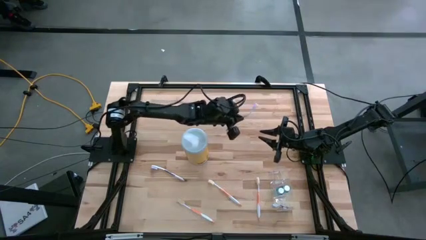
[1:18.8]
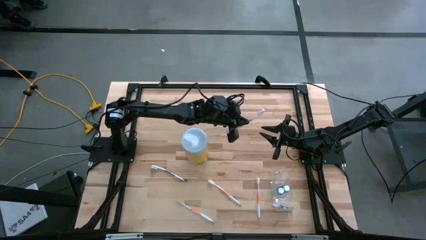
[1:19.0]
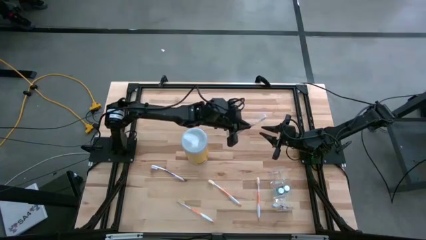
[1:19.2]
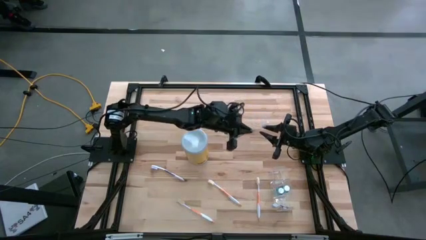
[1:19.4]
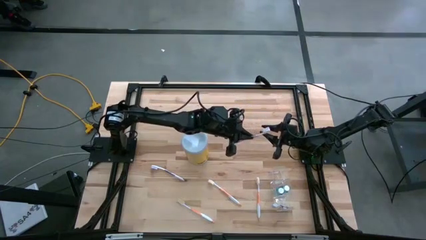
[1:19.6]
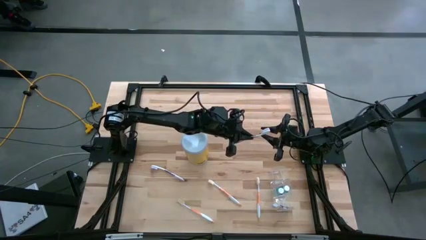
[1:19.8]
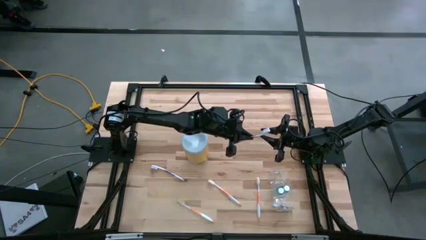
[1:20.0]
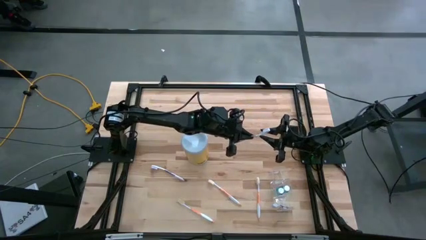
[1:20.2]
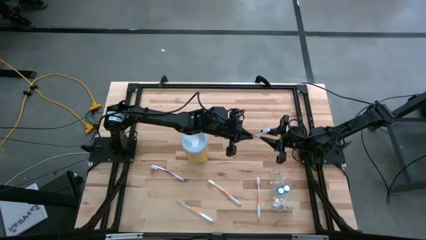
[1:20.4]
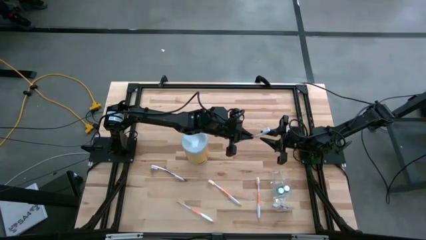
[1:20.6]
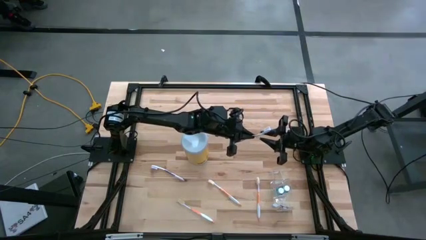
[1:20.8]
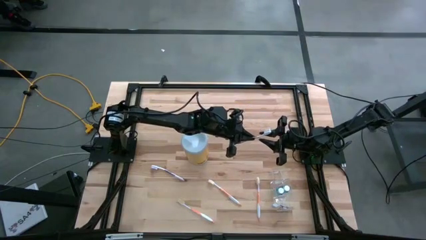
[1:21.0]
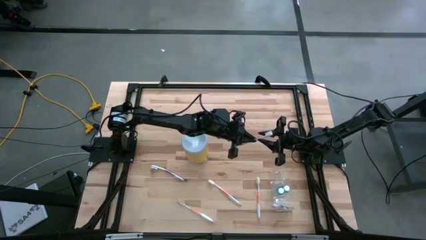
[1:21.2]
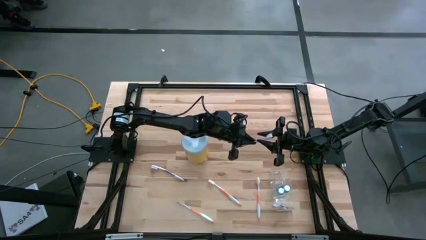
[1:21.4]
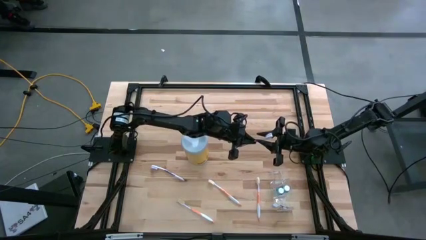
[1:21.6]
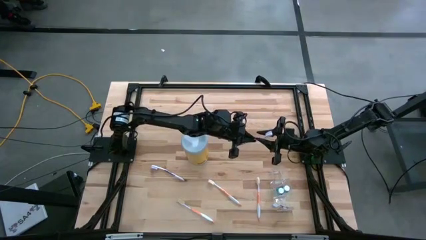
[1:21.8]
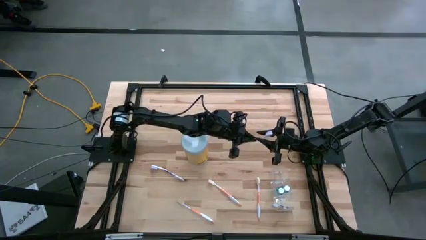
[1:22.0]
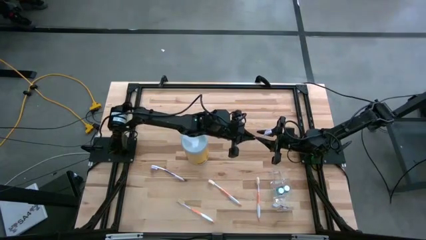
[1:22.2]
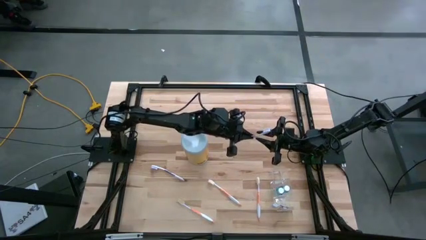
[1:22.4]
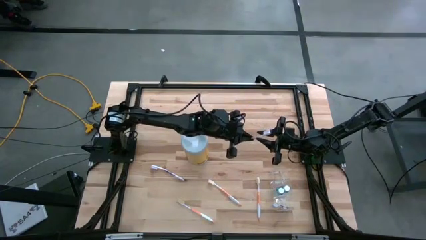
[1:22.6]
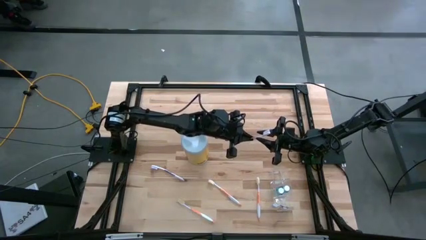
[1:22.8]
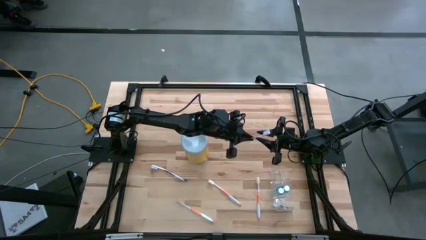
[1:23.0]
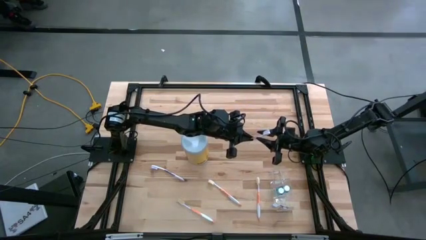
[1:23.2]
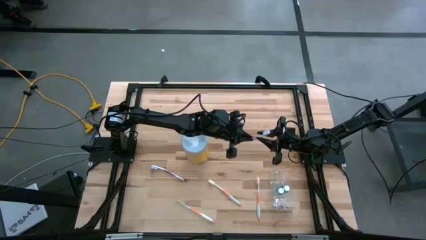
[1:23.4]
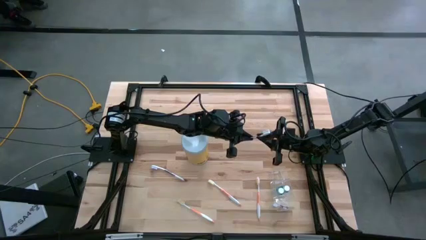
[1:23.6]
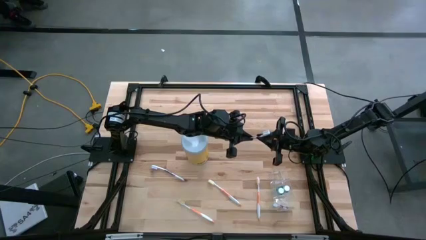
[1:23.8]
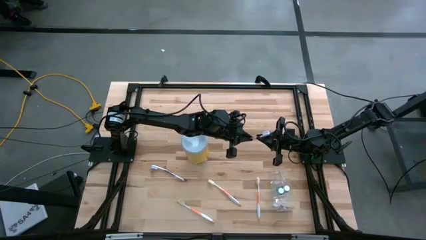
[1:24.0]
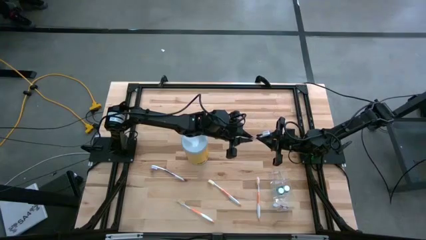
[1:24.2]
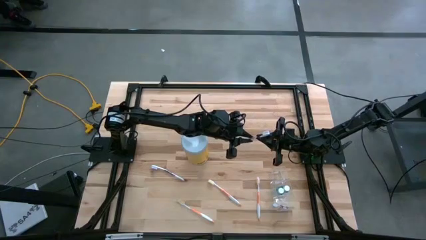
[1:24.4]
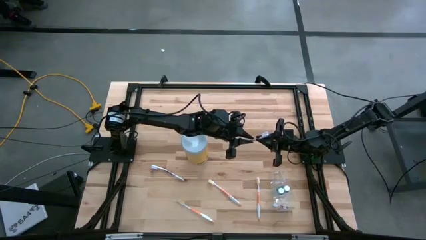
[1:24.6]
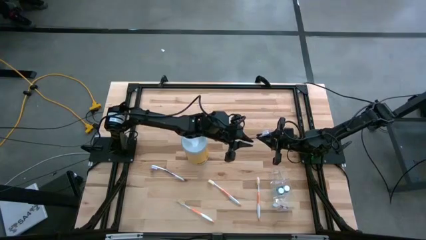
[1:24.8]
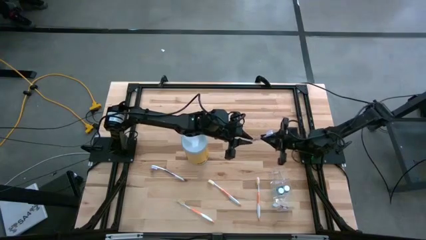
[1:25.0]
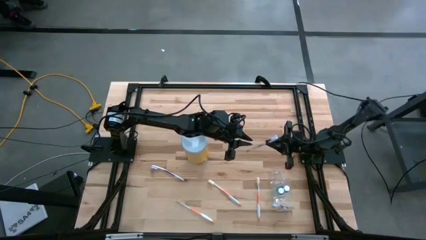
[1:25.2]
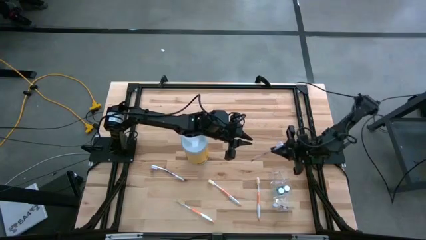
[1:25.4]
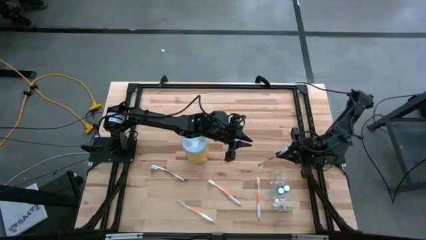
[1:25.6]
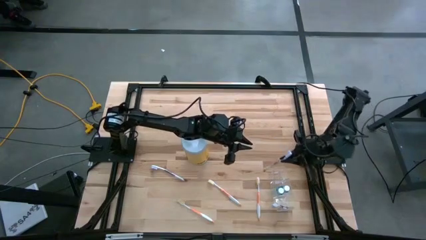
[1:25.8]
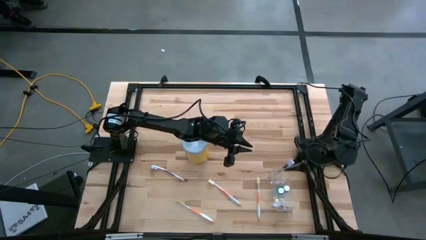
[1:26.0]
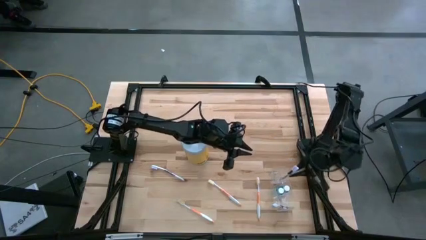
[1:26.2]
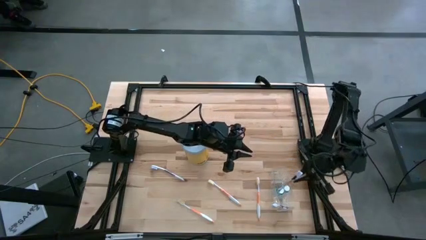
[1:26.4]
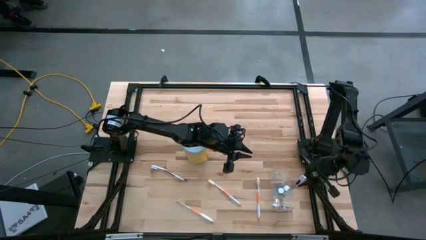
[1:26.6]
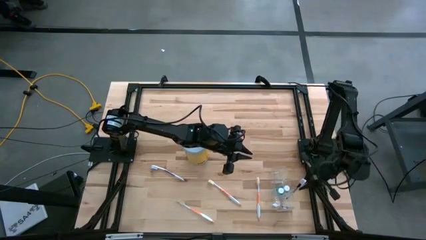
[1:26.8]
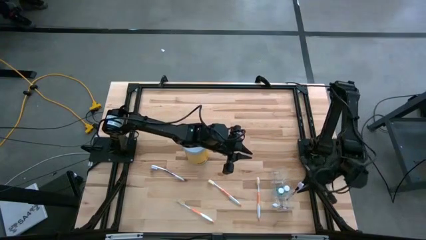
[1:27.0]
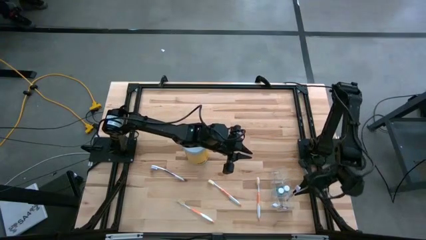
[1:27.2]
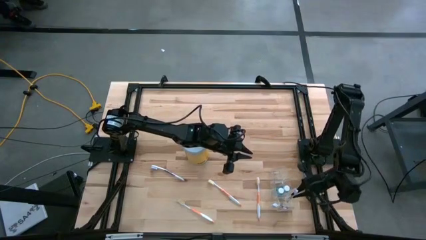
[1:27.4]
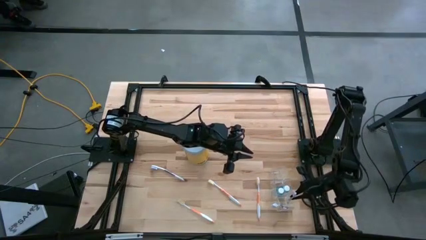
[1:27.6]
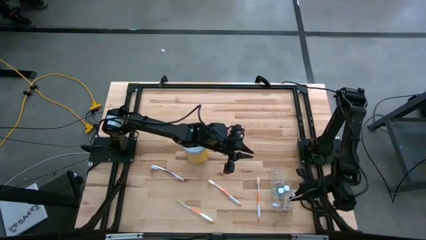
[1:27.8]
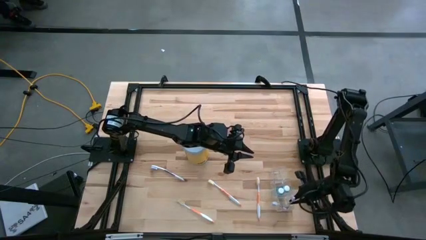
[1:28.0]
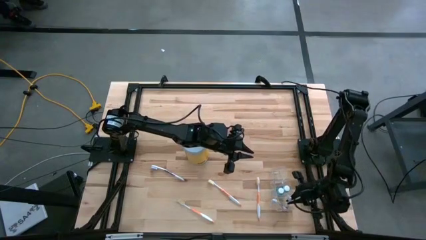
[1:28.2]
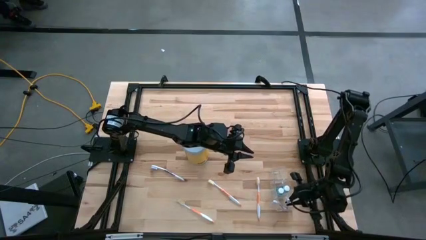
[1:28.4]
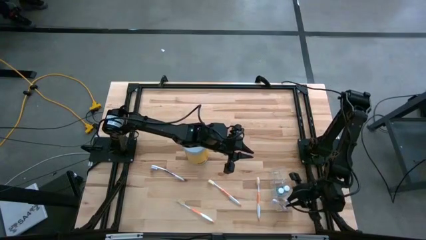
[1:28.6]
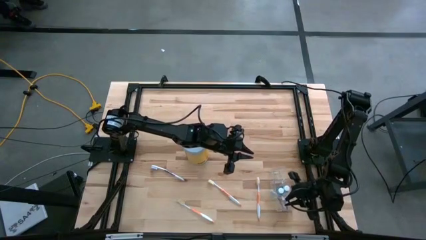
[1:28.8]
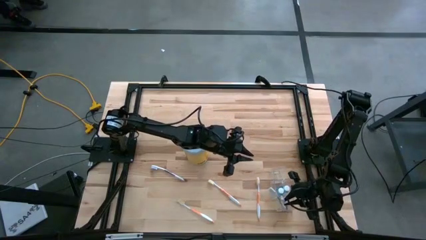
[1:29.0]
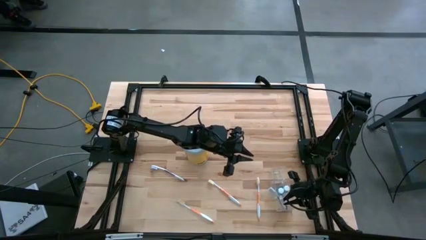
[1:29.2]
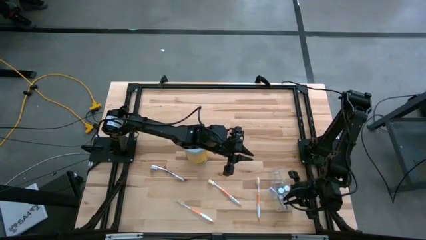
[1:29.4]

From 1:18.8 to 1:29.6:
Task: Pick & Place toothbrushing station
Put the top purple toothbrush in the bottom section of the transparent organizer

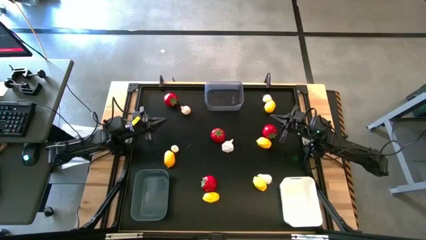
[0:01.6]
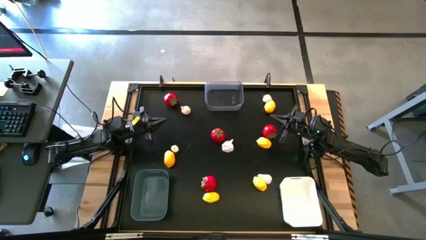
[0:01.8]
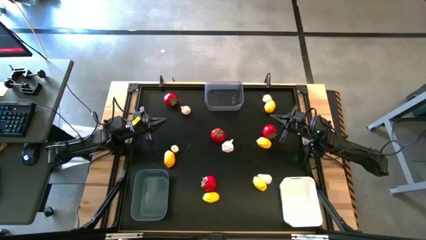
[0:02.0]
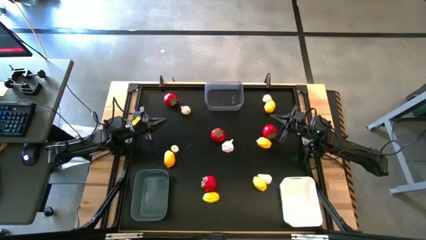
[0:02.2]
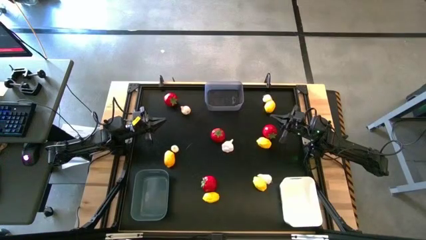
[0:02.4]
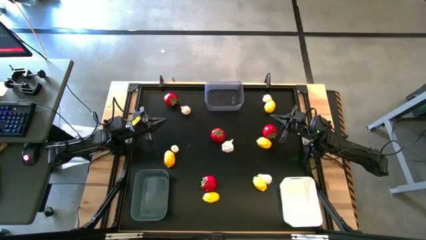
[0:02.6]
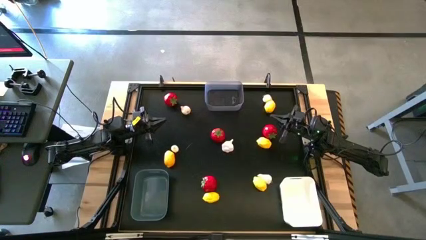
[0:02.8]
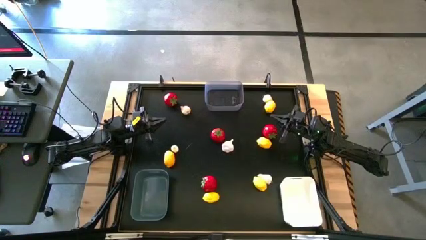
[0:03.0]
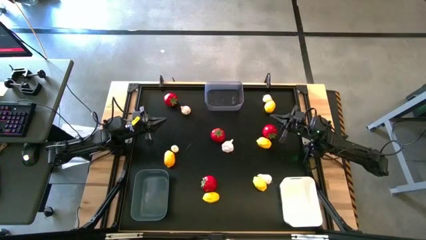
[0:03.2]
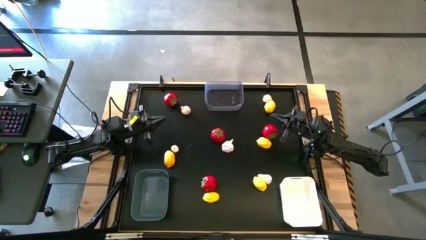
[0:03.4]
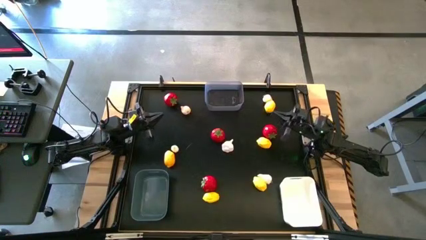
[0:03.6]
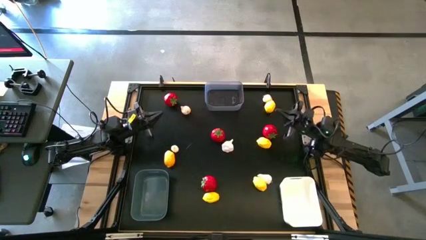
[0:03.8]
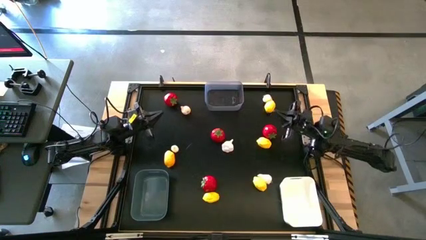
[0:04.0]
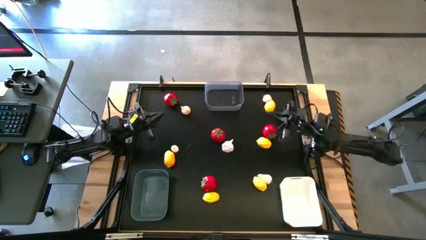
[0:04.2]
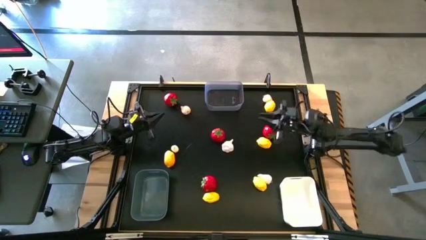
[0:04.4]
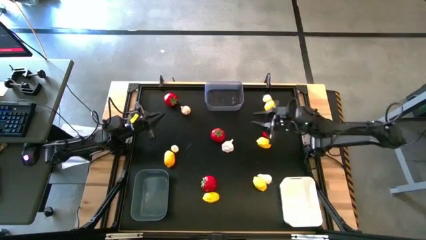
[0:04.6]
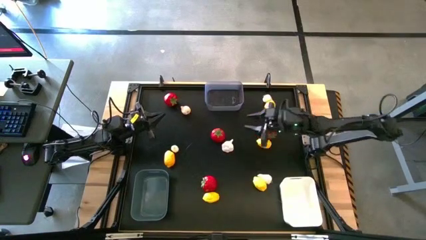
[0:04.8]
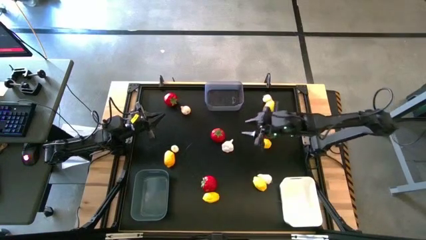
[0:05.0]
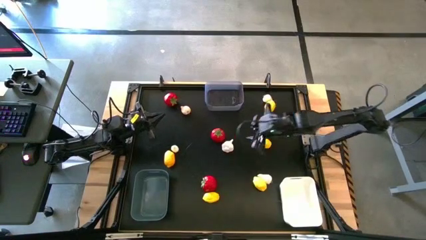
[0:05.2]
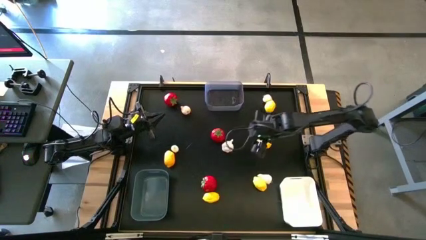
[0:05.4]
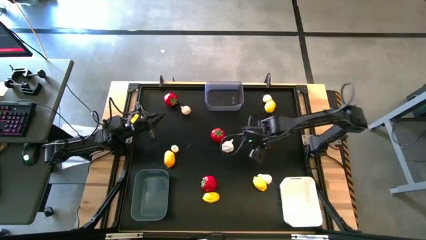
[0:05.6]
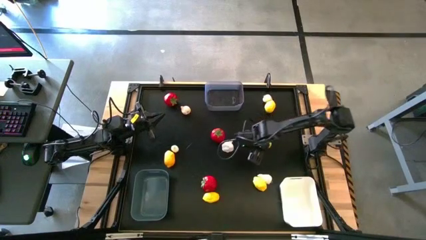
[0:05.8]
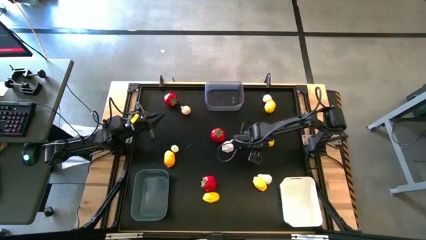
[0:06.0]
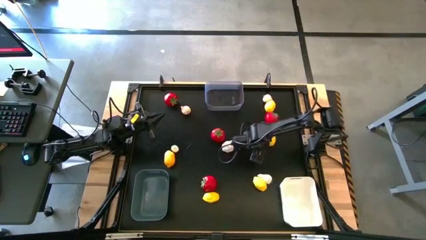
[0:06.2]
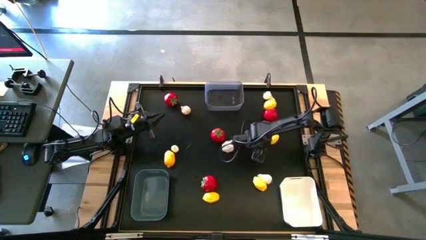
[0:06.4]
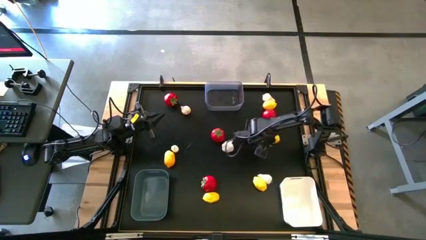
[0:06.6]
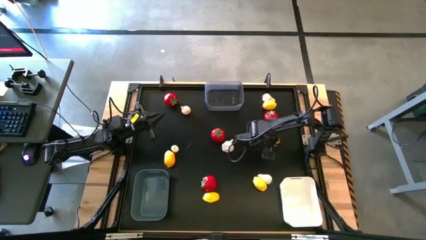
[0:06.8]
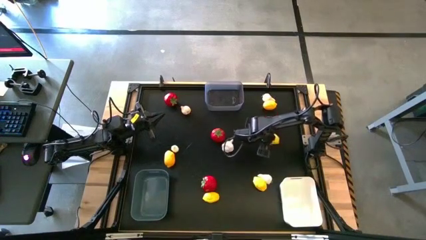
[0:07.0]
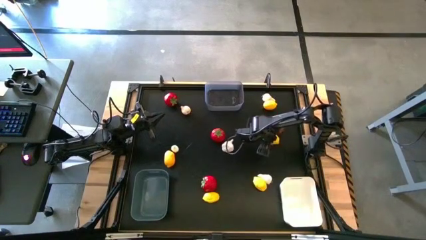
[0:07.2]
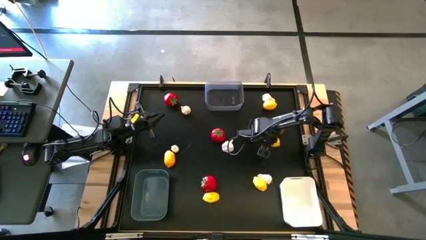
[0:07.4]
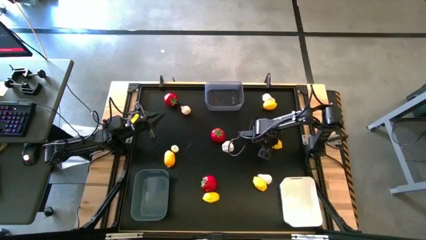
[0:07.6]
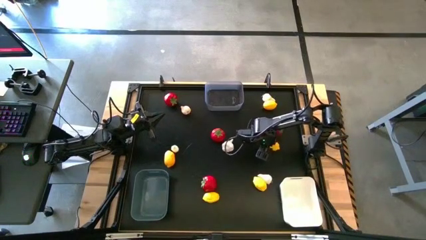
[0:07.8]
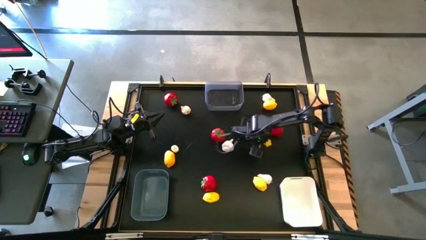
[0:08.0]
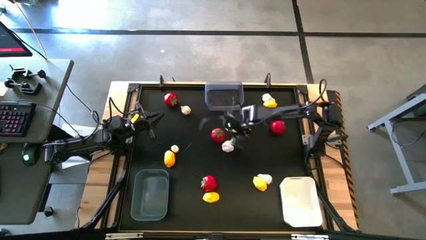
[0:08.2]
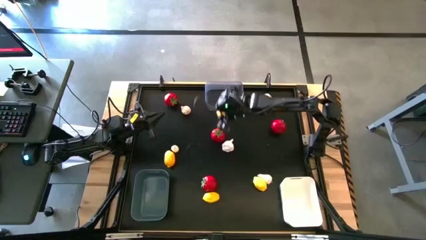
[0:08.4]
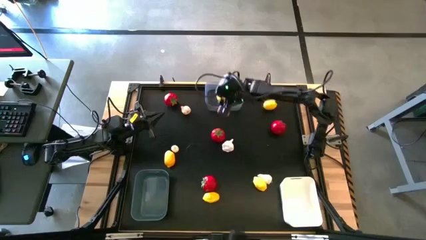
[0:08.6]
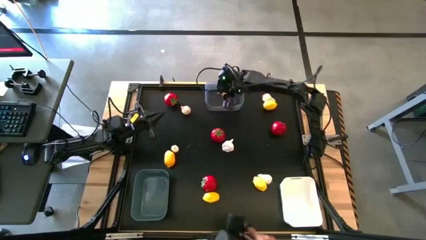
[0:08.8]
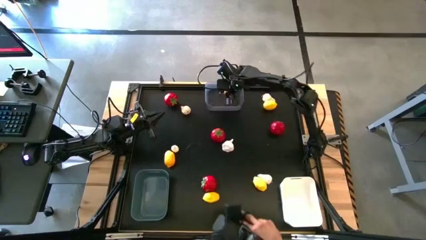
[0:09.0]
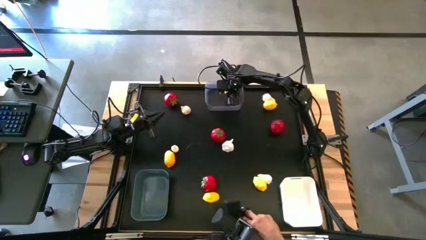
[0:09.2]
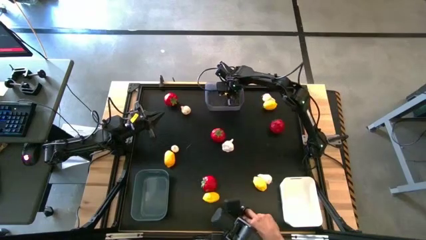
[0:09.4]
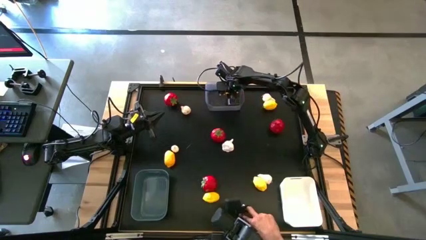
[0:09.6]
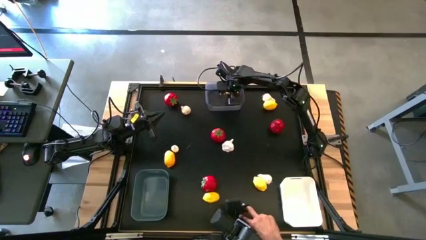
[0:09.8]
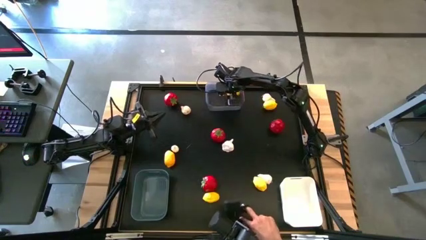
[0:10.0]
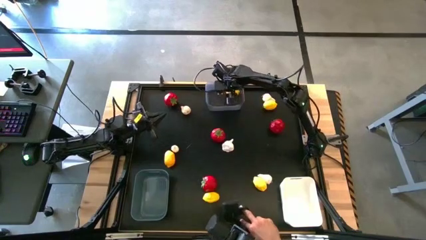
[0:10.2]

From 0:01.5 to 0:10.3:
Task: Sort produce into baskets
Put the middle right lemon into the transparent bin
